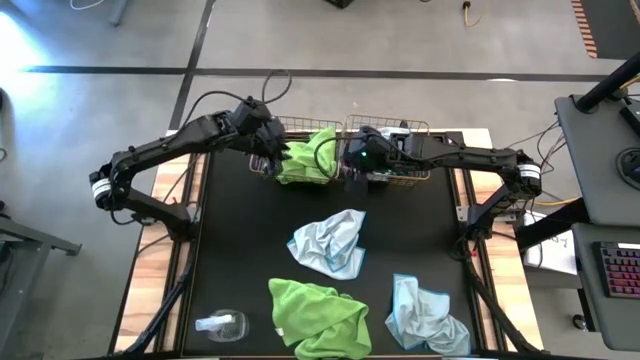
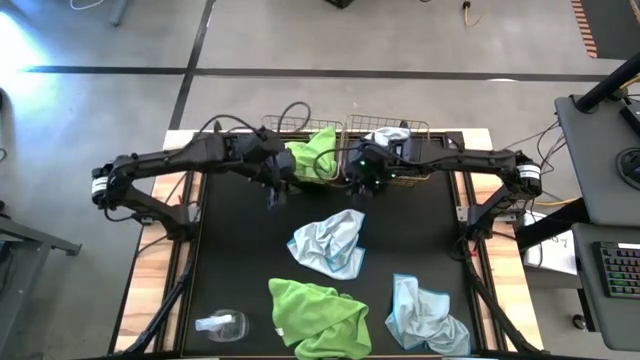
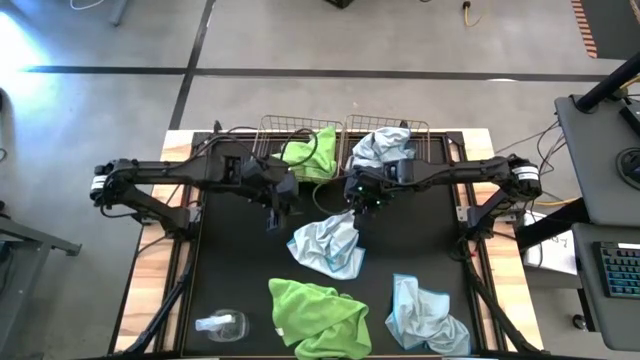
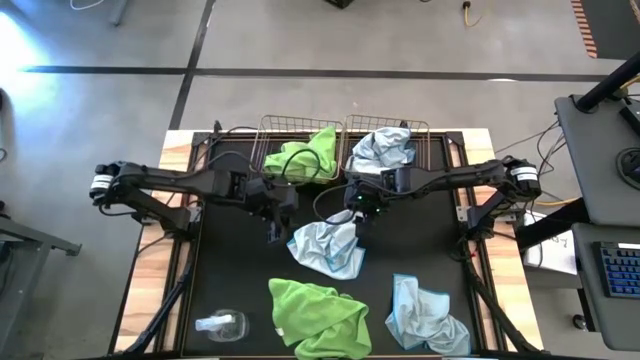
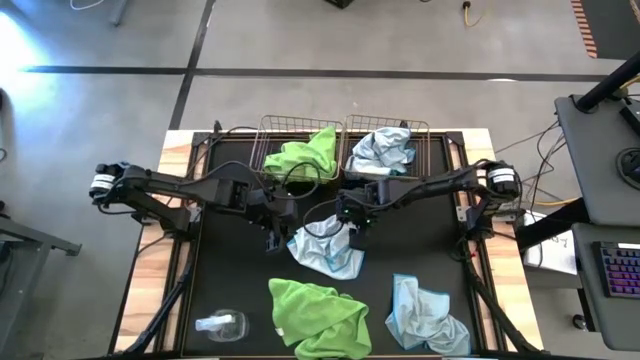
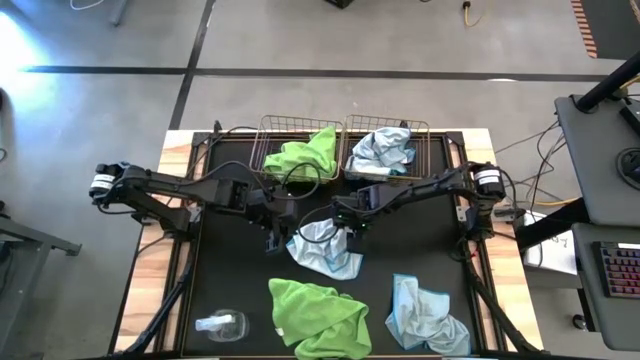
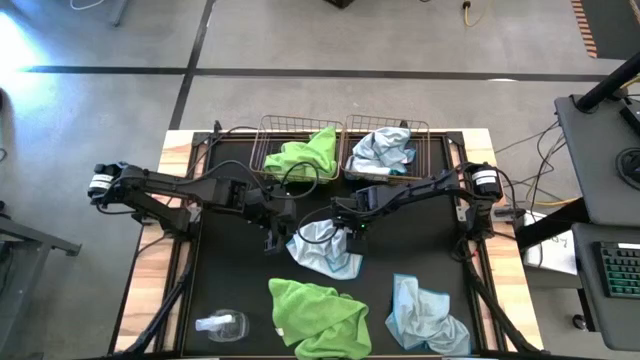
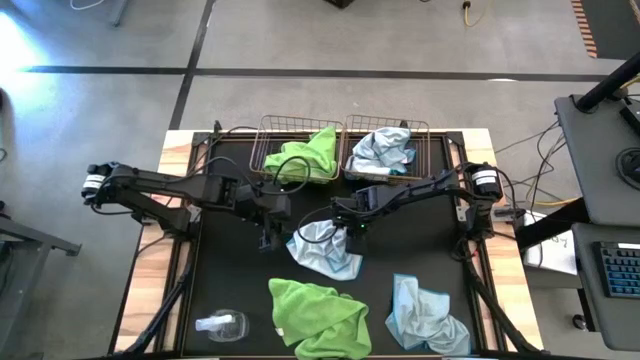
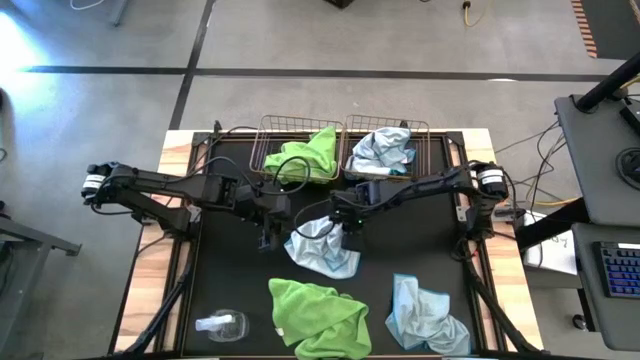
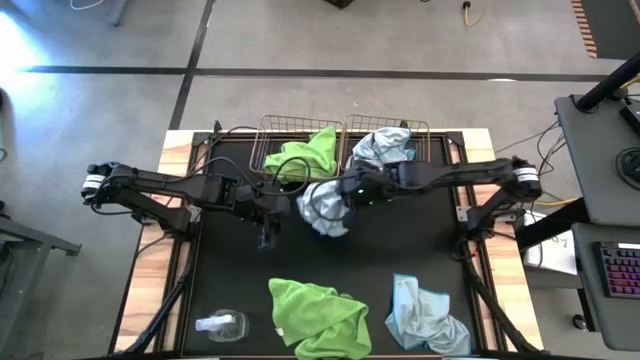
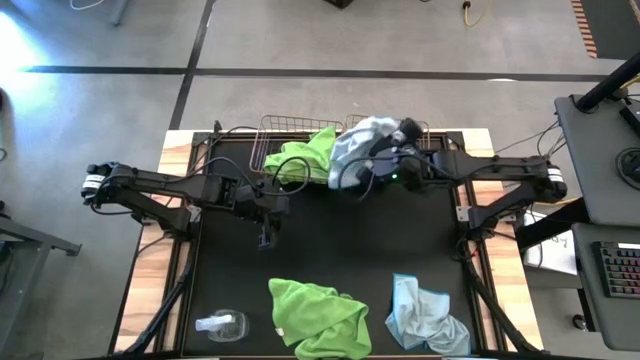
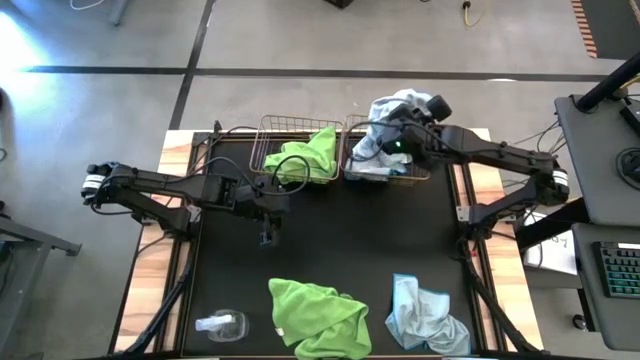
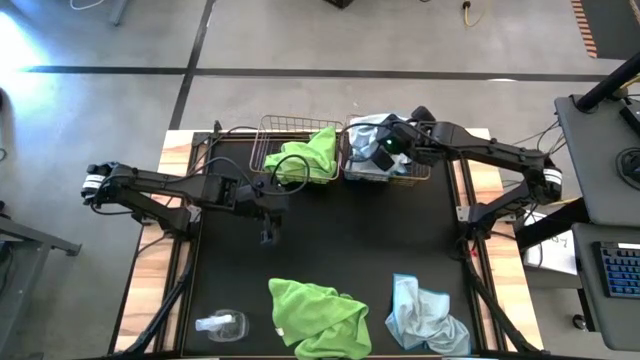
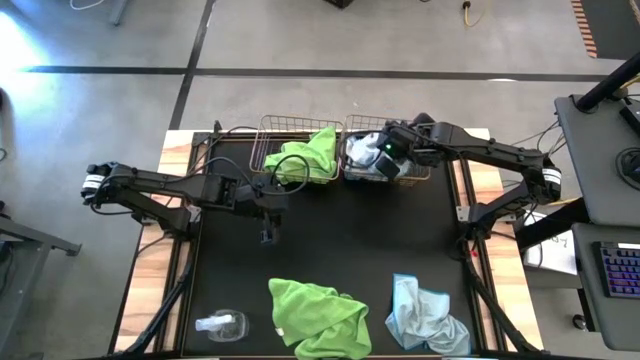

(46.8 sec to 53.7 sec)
Task: Sort microfiber towel by color & place in baskets
Put the white microfiber cloth into the right wire basket

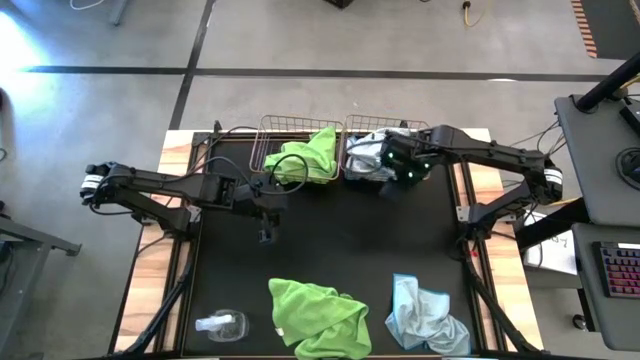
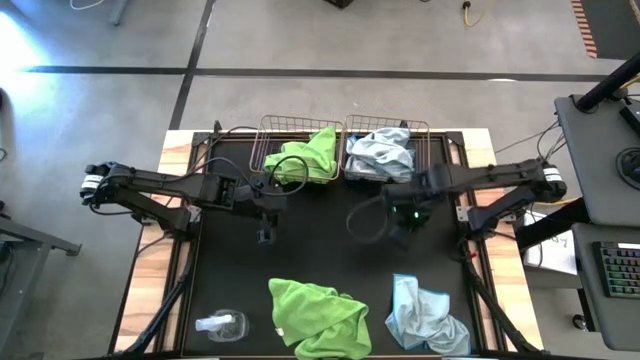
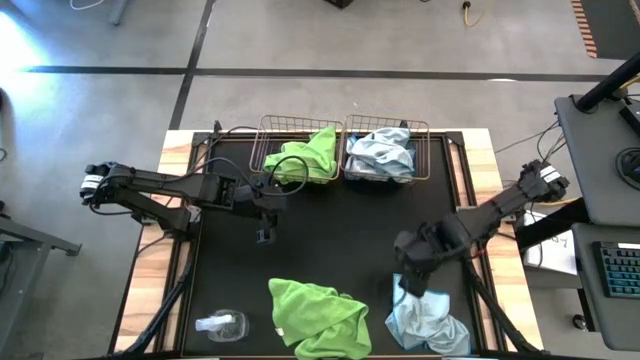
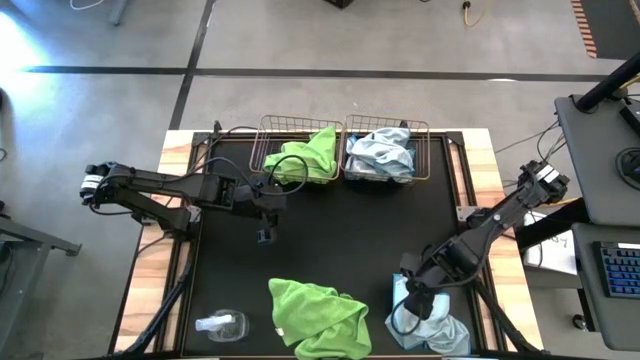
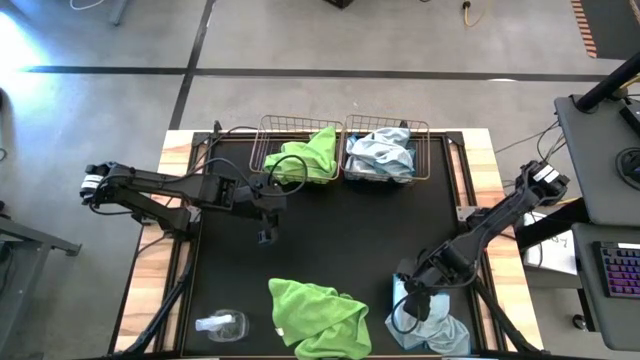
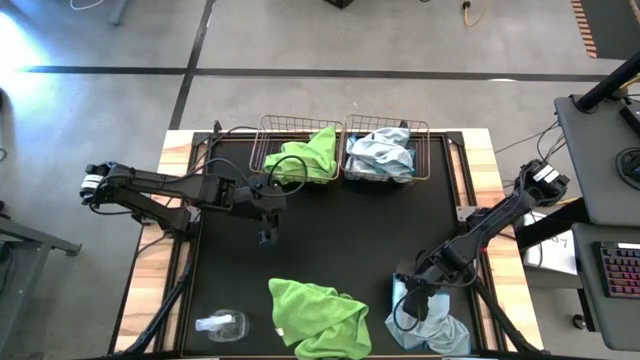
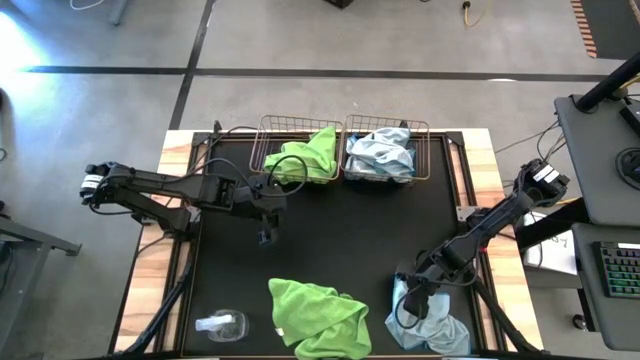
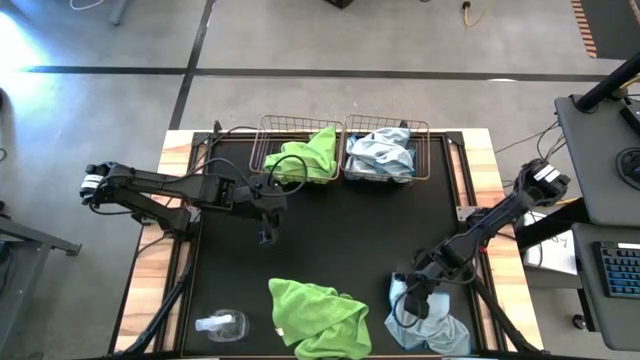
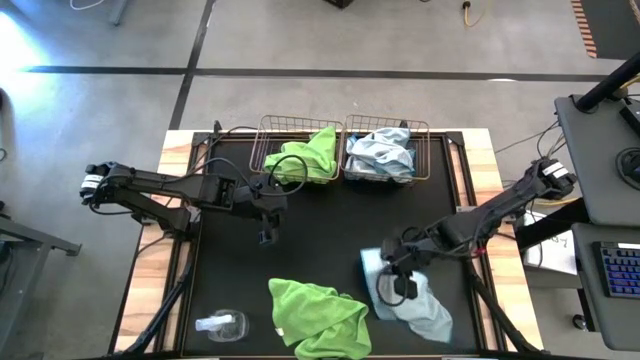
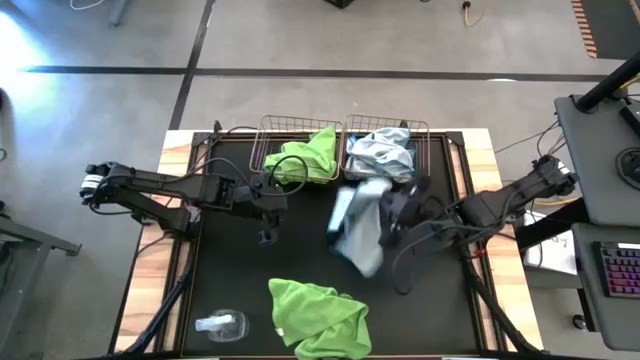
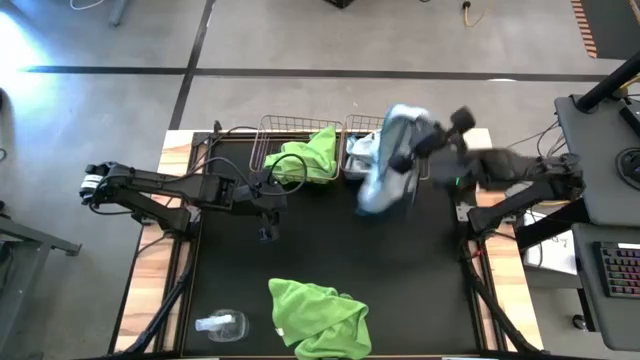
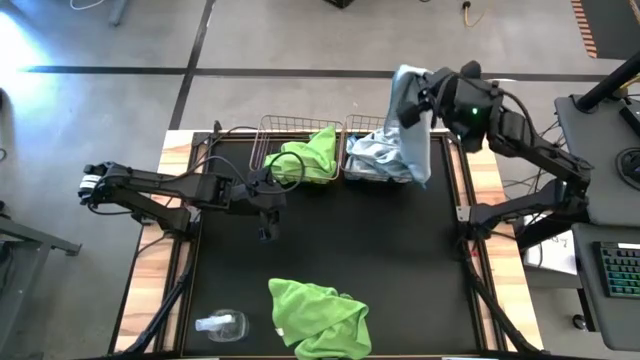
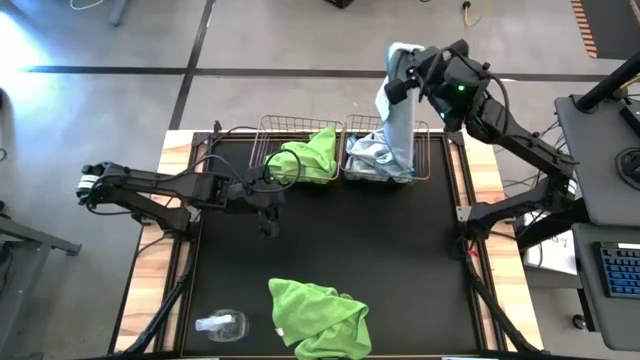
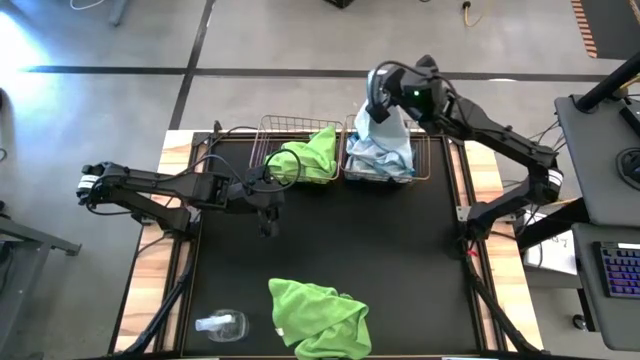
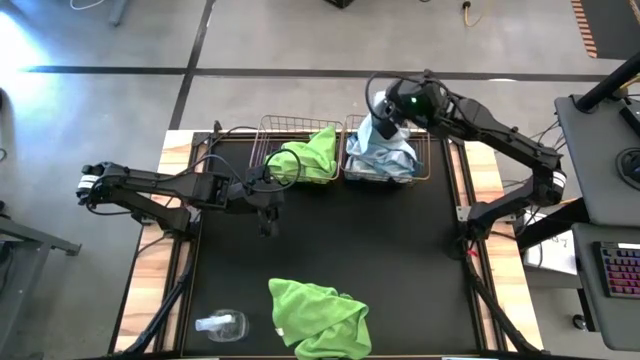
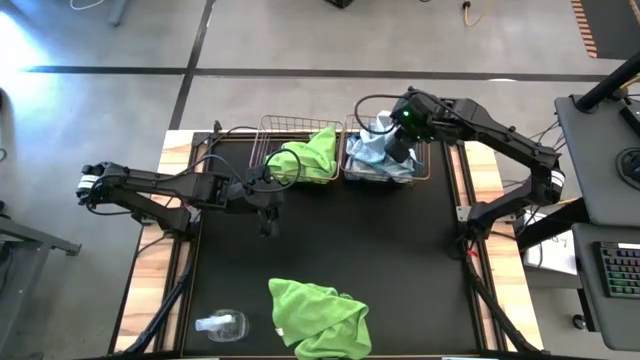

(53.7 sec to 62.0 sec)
Put the white microfiber cloth into the right wire basket

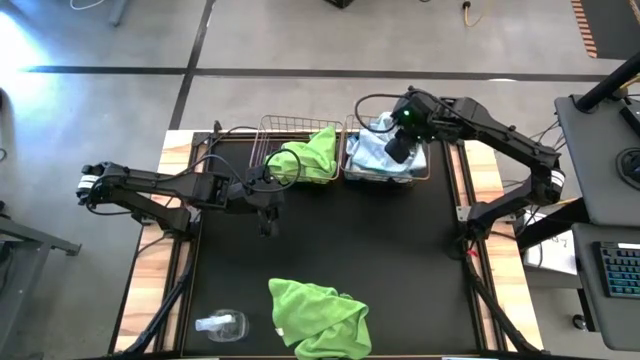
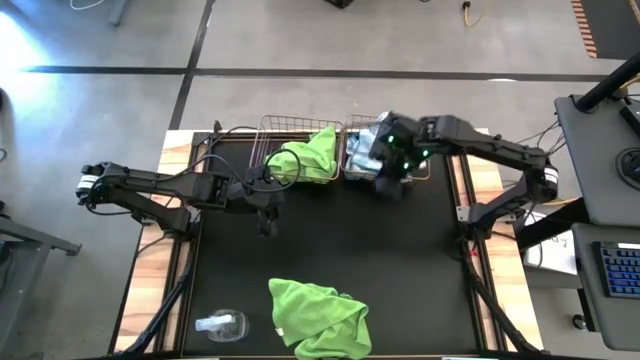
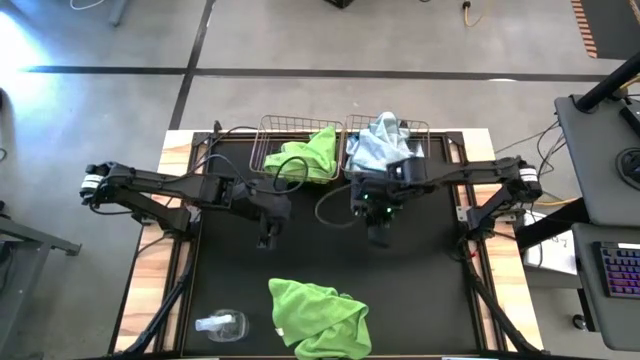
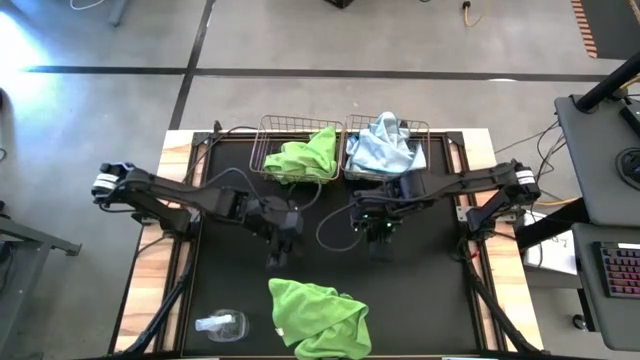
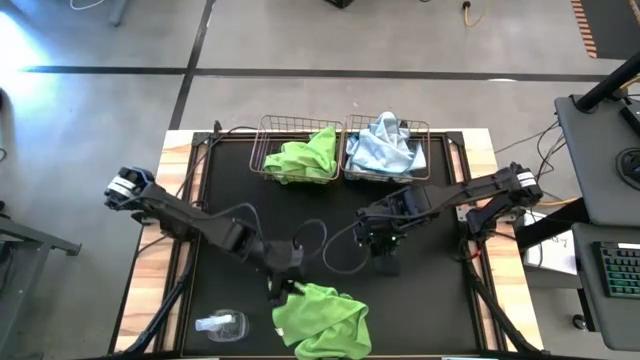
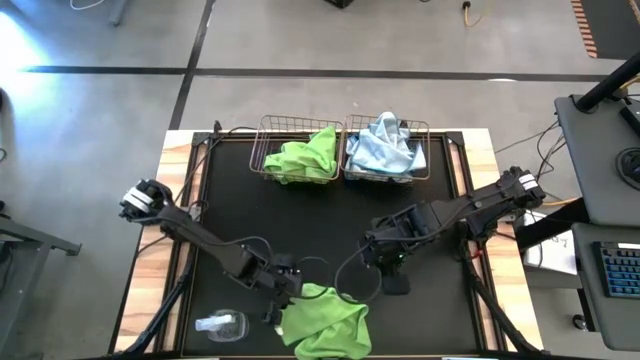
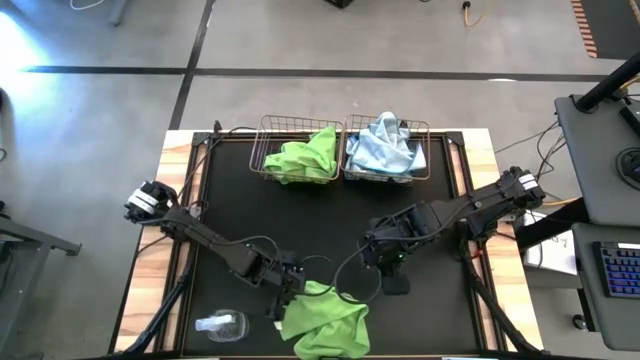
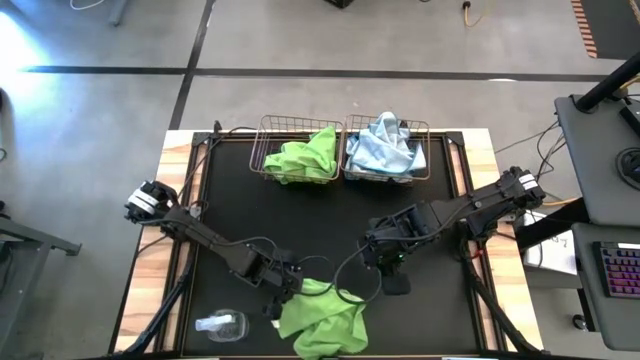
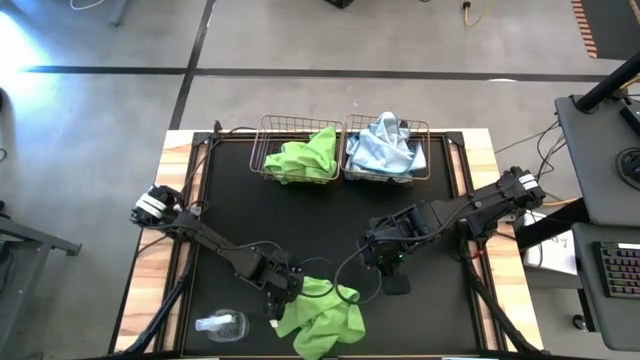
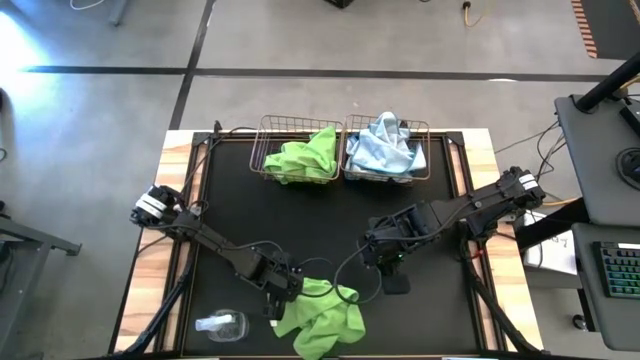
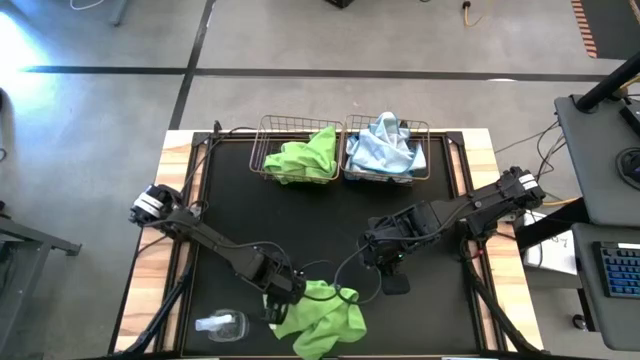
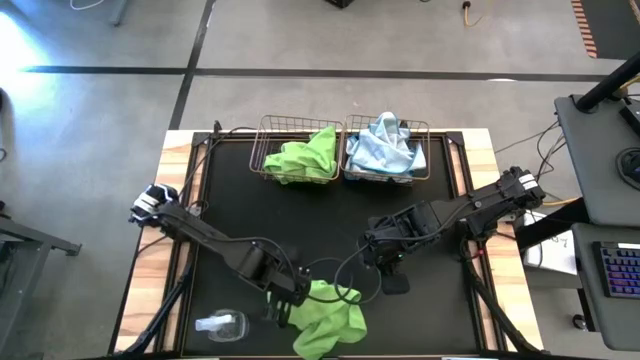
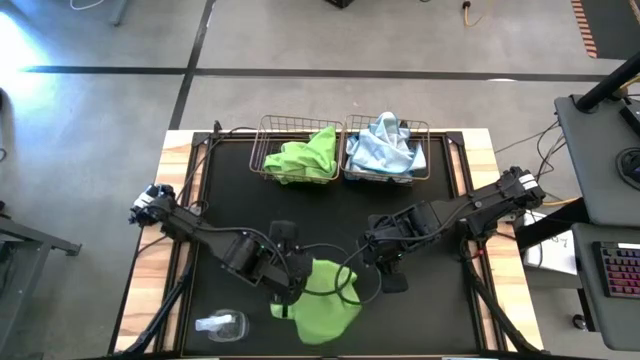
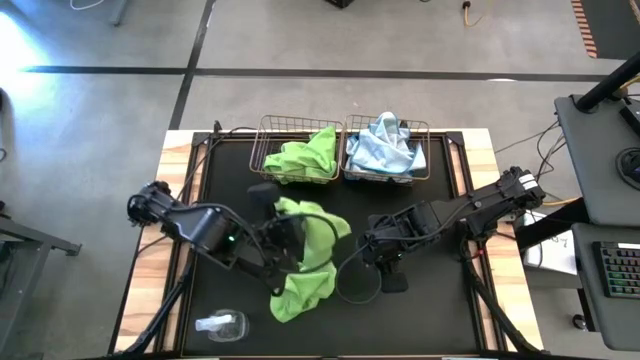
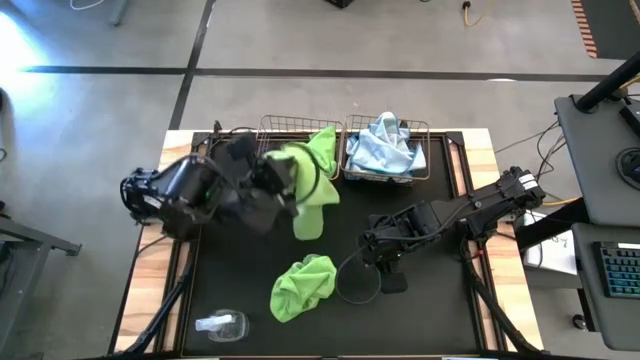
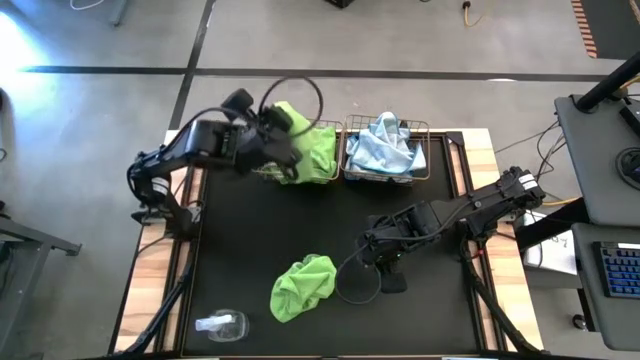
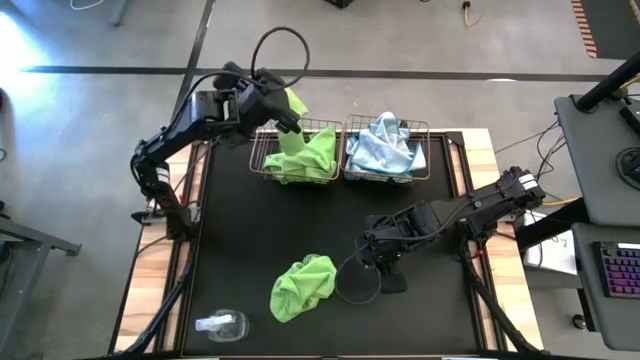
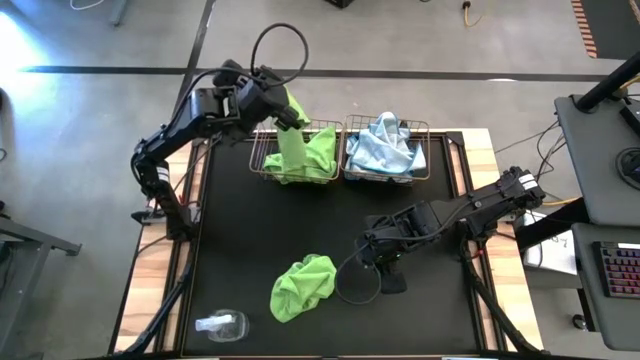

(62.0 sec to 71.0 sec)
Put the green microfiber cloth into the left wire basket
